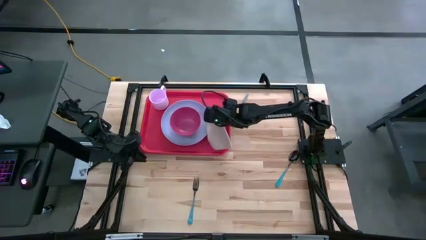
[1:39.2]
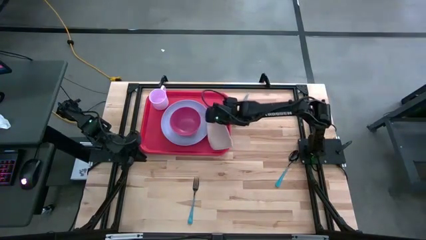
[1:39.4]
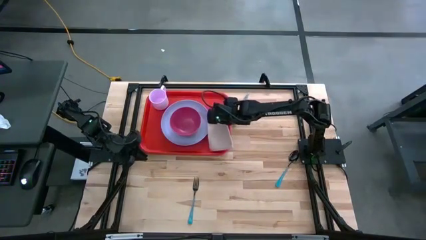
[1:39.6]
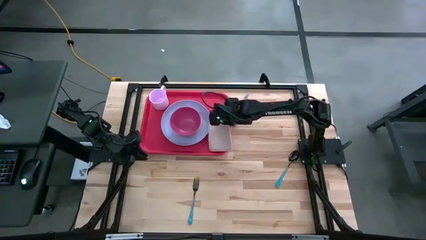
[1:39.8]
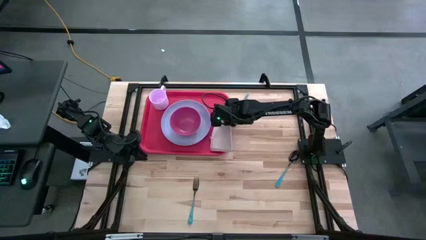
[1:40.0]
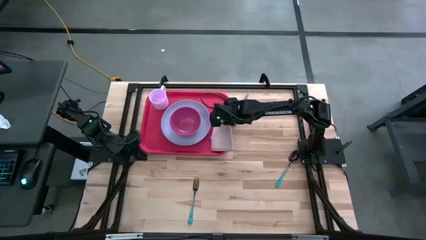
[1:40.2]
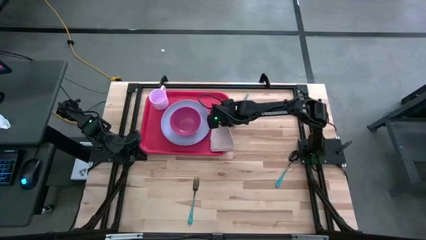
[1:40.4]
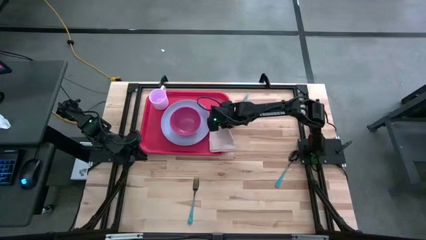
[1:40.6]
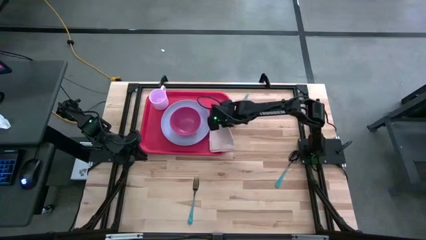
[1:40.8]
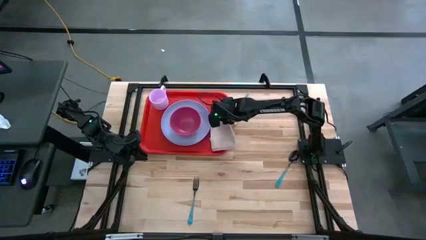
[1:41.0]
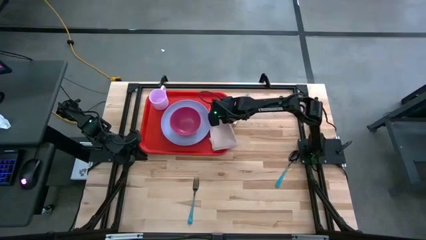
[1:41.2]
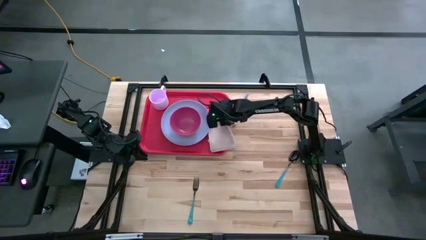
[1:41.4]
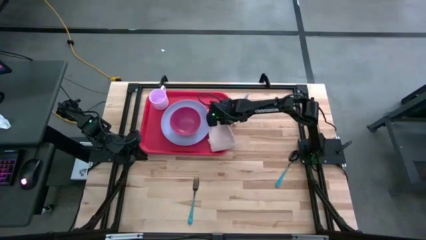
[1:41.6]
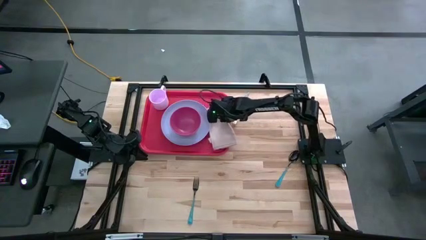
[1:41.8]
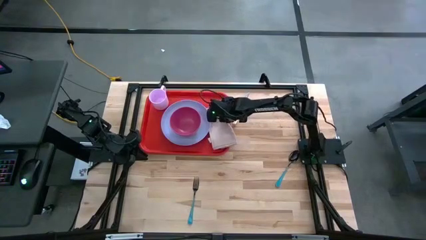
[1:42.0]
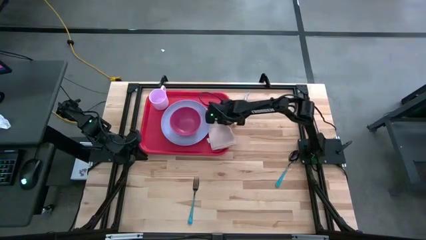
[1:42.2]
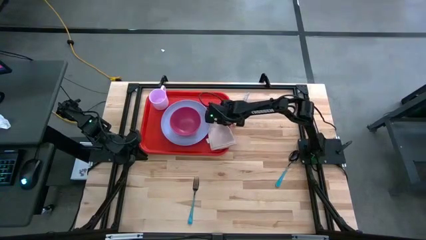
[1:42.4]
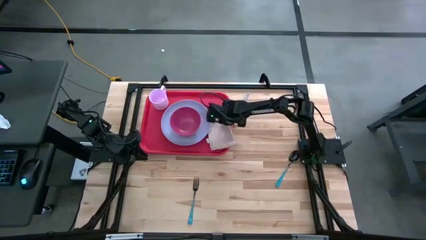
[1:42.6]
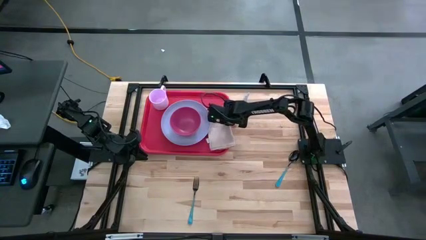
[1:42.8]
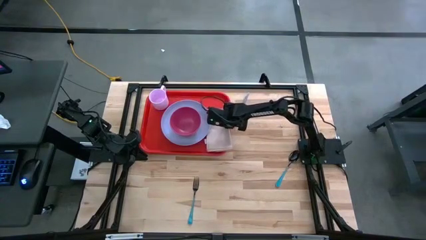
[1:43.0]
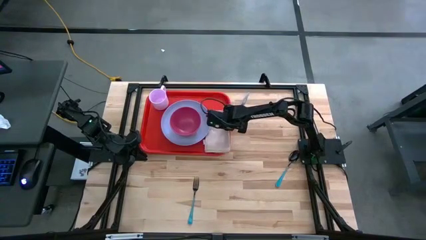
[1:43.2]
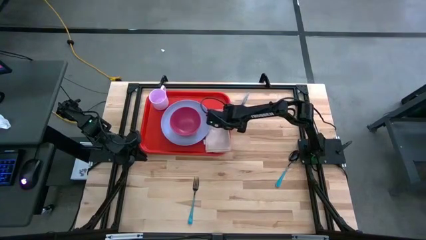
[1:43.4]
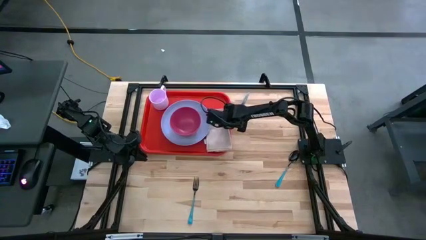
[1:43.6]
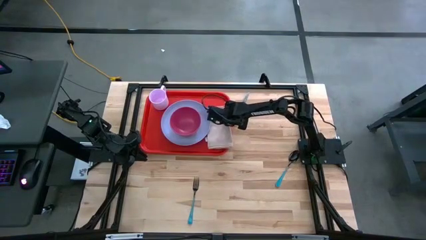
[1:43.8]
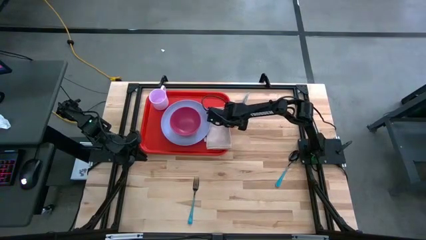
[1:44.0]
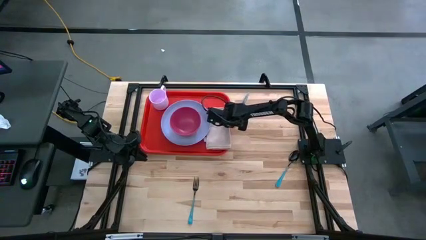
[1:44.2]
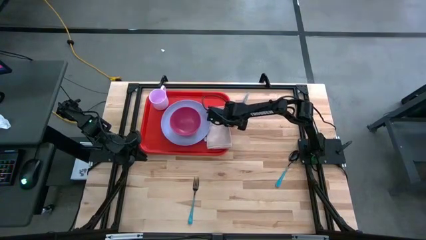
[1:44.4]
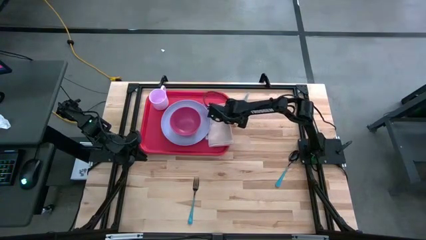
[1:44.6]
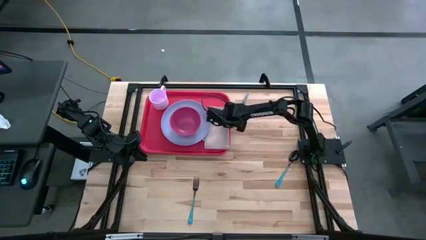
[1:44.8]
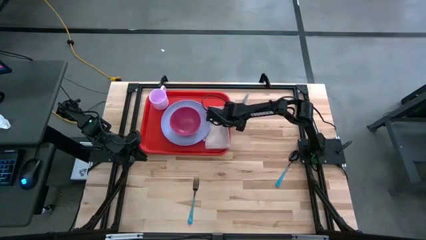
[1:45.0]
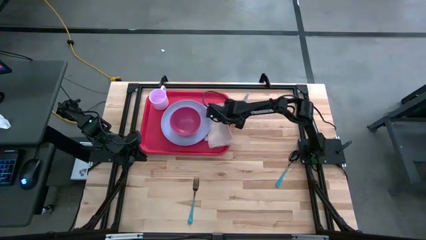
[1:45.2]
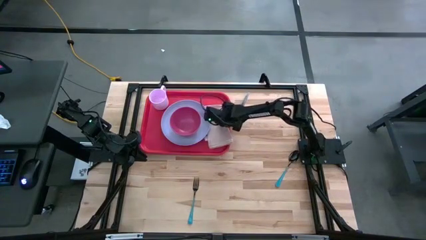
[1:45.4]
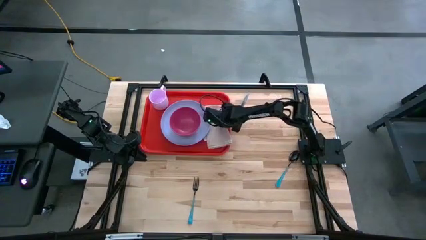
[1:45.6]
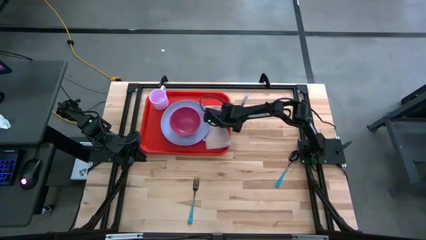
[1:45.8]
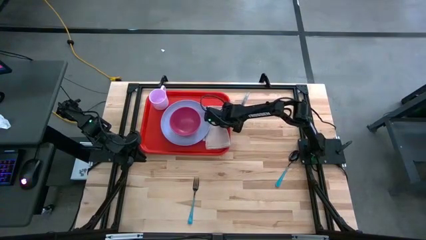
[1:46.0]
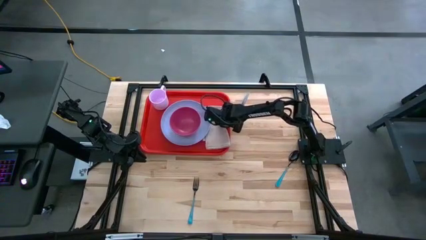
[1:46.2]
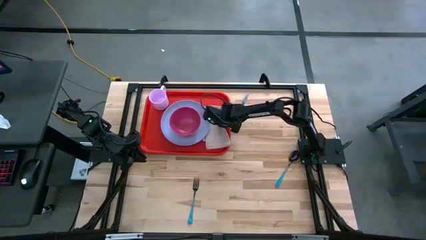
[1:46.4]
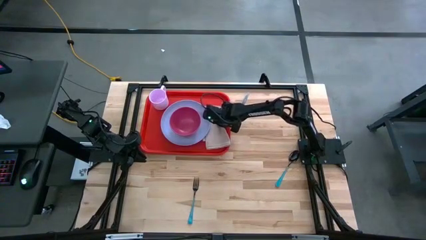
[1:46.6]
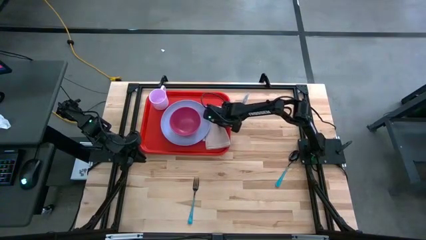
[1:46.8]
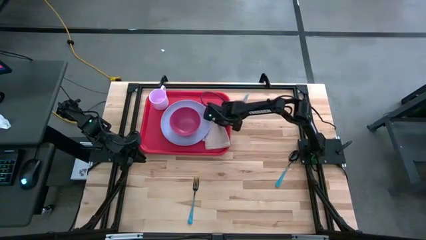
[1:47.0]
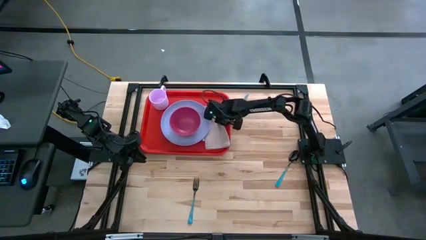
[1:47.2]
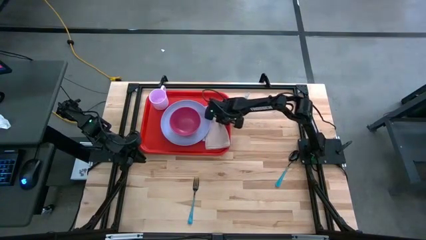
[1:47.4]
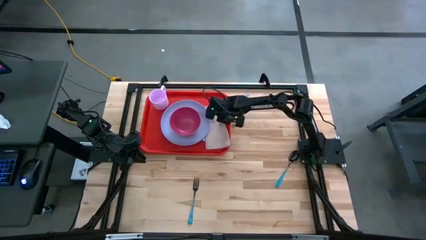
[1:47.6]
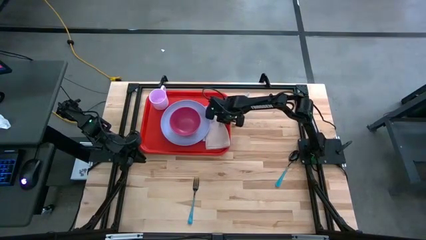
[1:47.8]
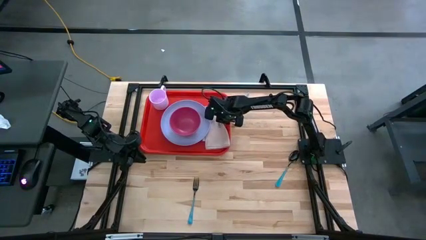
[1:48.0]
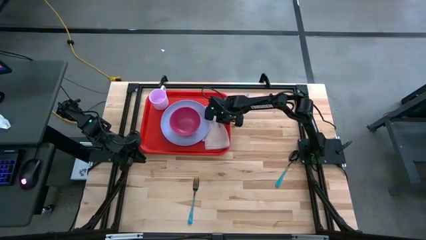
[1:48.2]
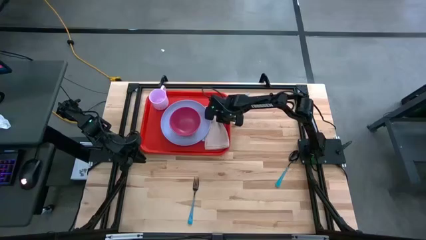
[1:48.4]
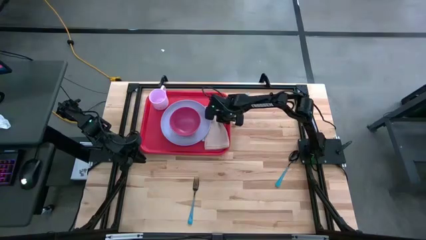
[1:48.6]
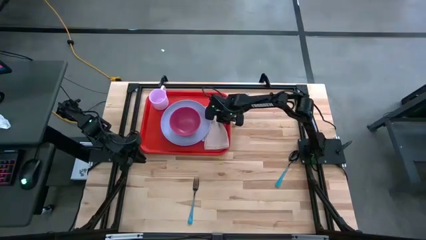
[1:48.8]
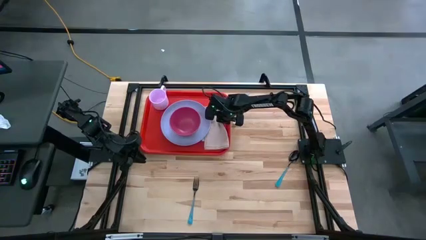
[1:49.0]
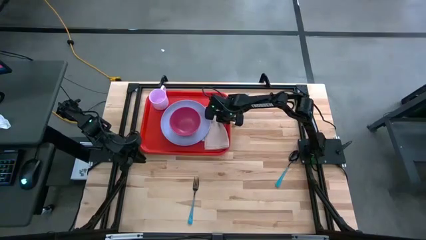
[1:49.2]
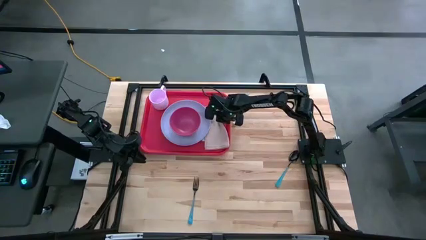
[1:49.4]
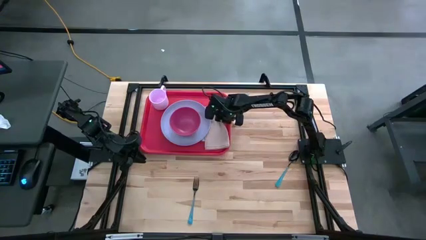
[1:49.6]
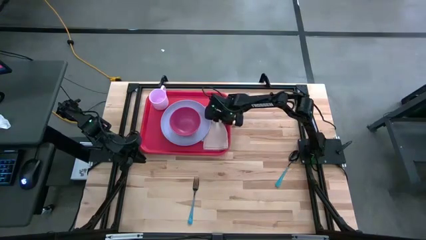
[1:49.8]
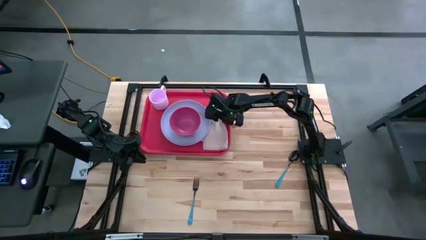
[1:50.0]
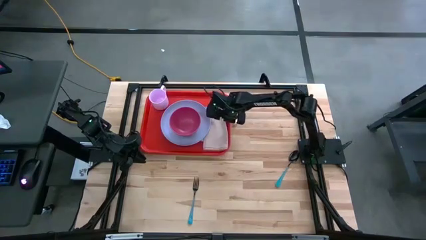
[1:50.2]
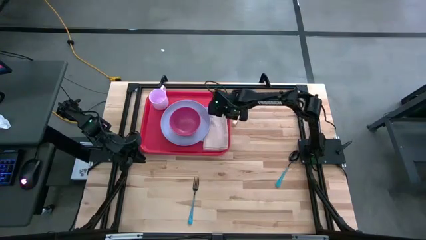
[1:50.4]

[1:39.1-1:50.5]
Task: Set up tray
Put the brown napkin on the red tray to the right of the purple plate

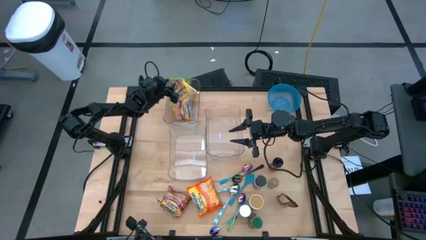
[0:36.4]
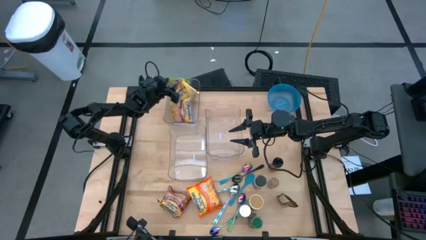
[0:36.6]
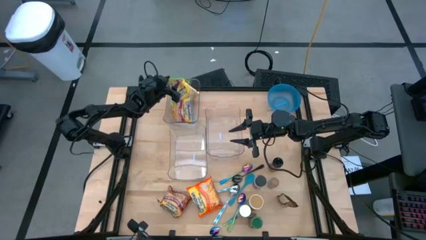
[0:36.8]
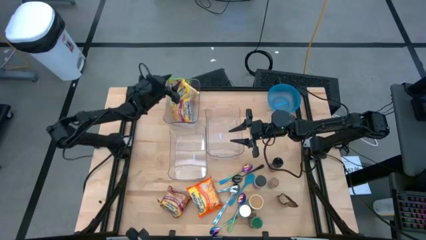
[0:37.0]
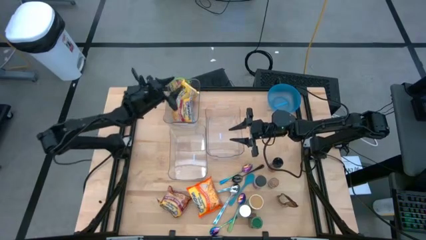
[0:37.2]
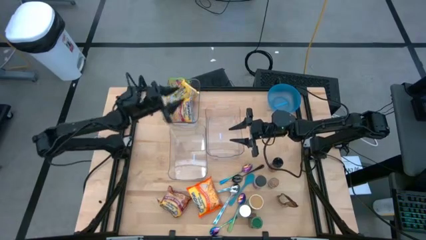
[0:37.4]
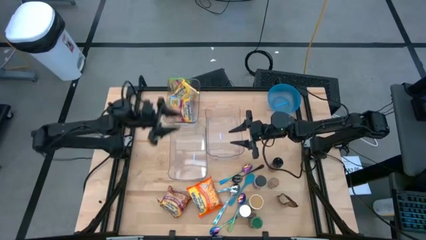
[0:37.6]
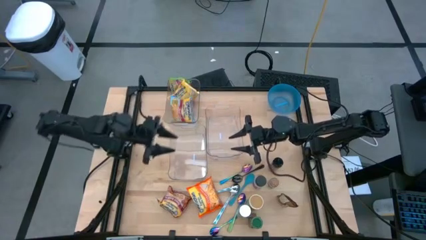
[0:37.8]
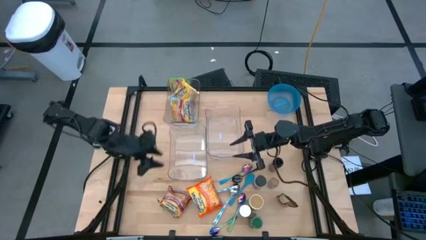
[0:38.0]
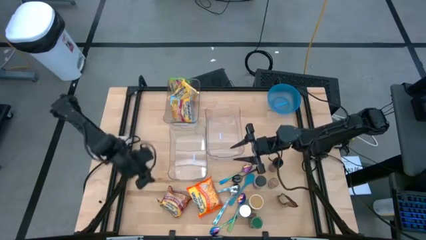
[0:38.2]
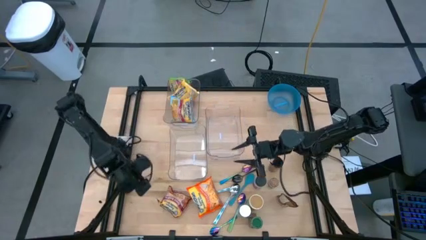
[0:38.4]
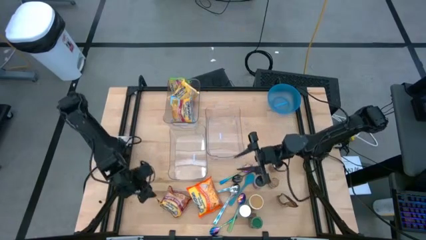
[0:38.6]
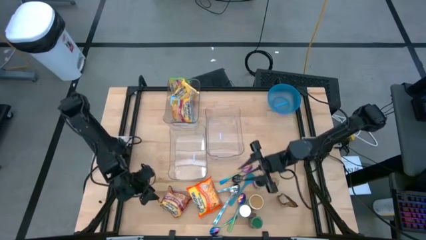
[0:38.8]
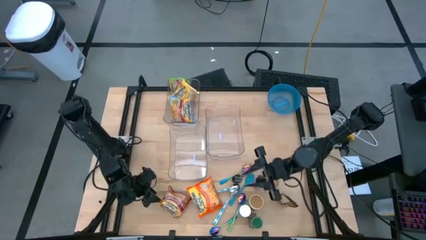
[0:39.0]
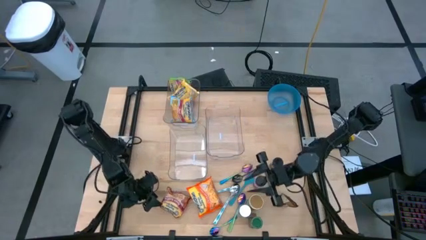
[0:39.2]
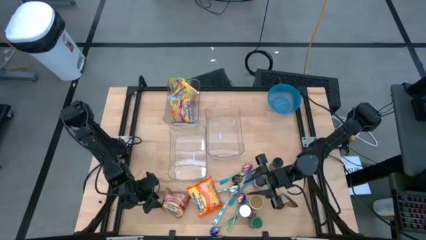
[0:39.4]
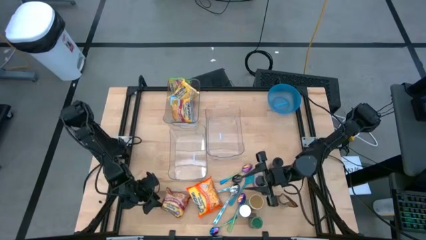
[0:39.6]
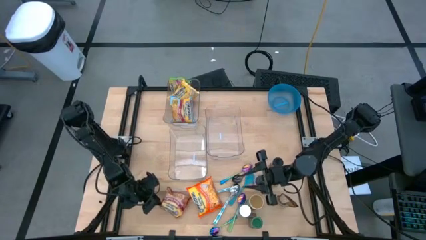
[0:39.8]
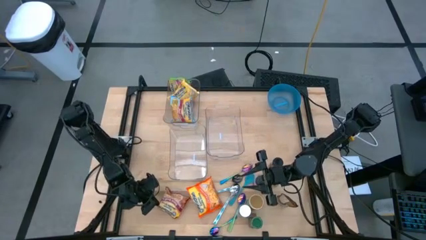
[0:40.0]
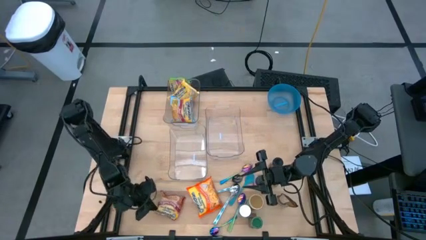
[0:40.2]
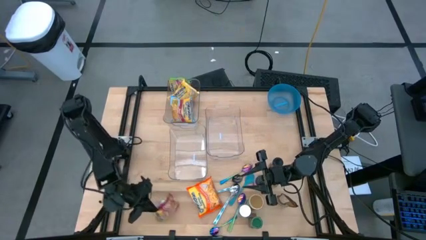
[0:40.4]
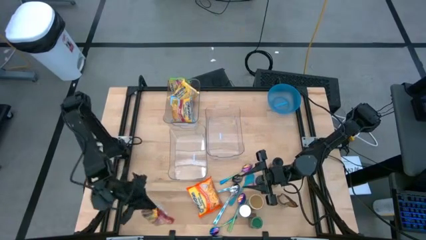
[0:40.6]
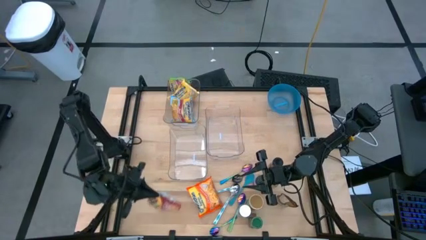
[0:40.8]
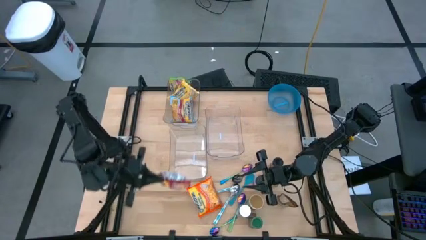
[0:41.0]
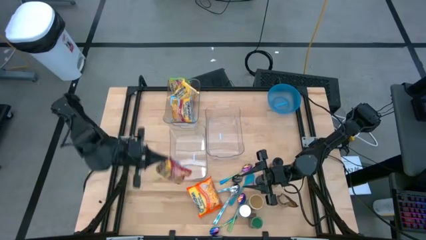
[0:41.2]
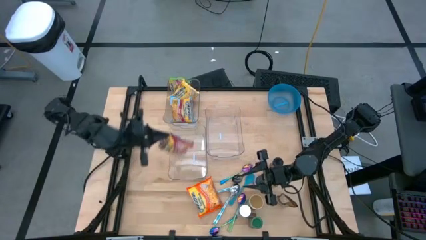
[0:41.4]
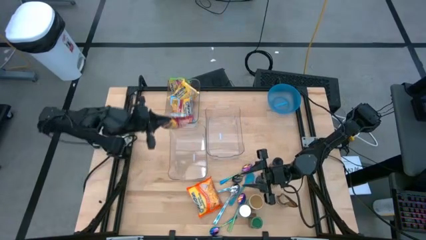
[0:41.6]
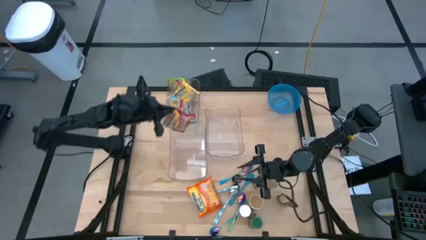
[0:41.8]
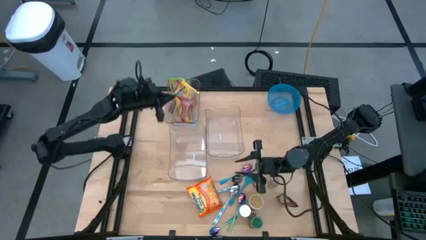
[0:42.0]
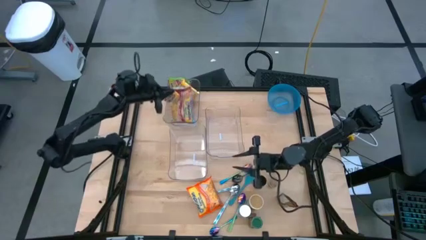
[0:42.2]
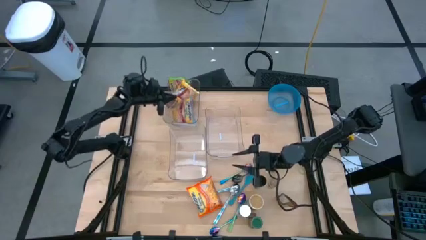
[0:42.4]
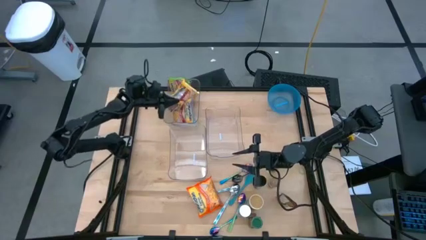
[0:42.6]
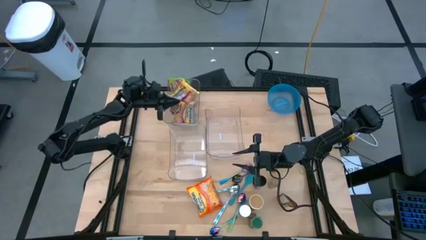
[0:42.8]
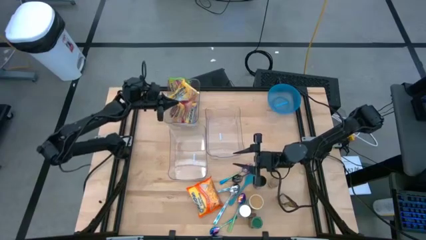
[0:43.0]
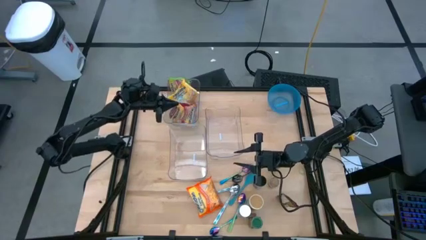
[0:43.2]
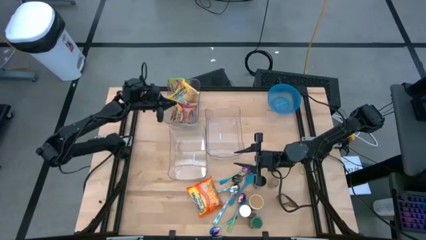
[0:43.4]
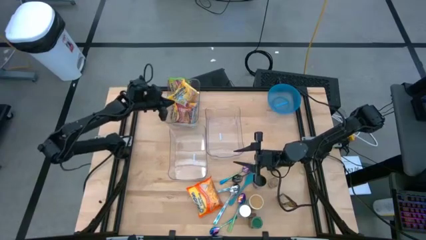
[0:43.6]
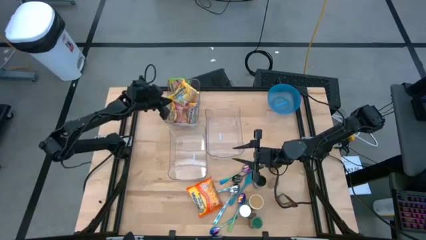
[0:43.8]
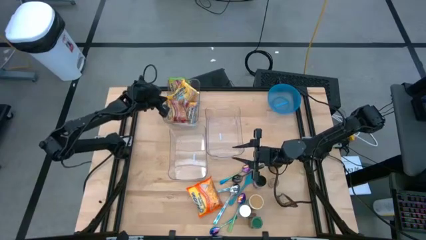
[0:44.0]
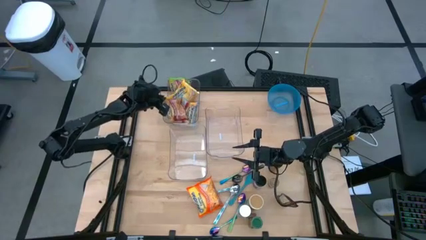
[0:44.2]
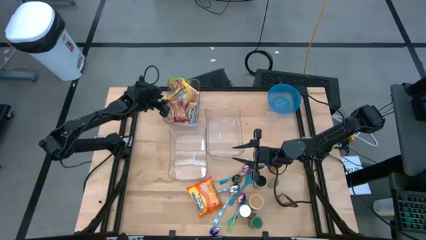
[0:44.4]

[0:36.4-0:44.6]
Task: Pick & Place Food Item
Put the red noodle pack into the top transparent bin
